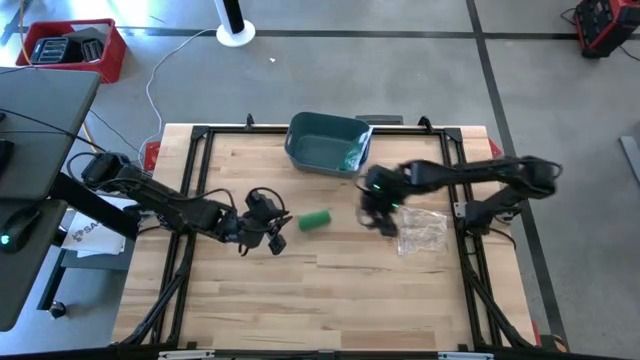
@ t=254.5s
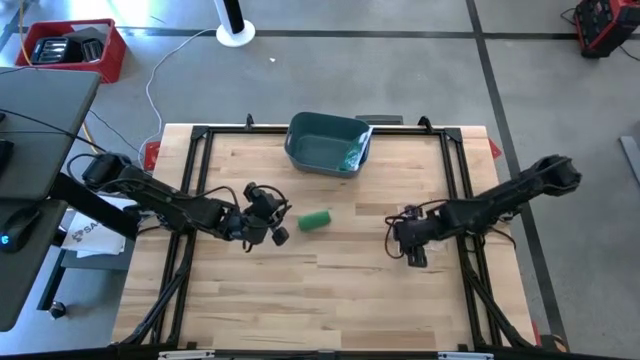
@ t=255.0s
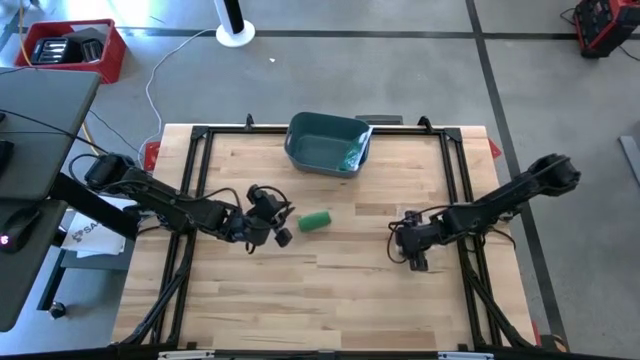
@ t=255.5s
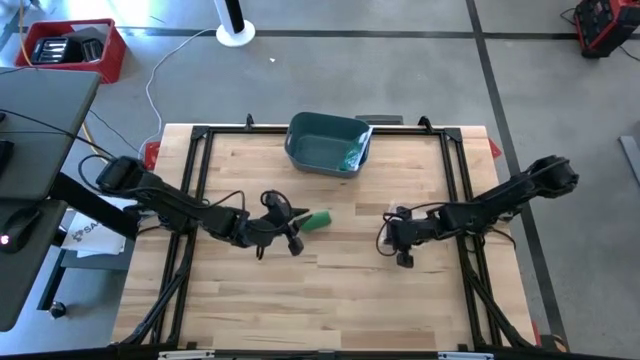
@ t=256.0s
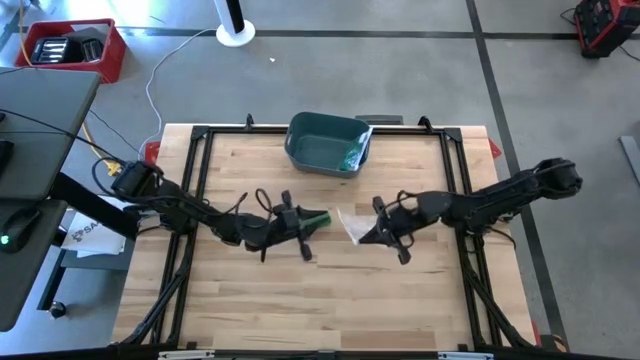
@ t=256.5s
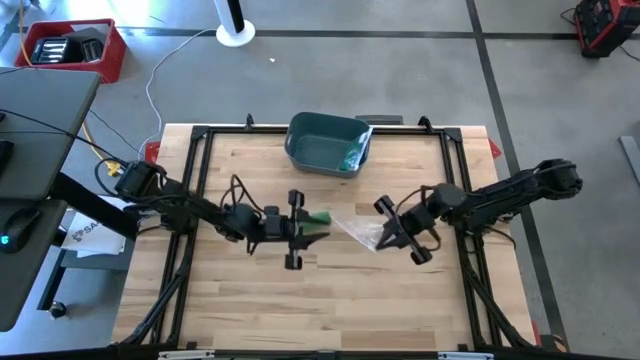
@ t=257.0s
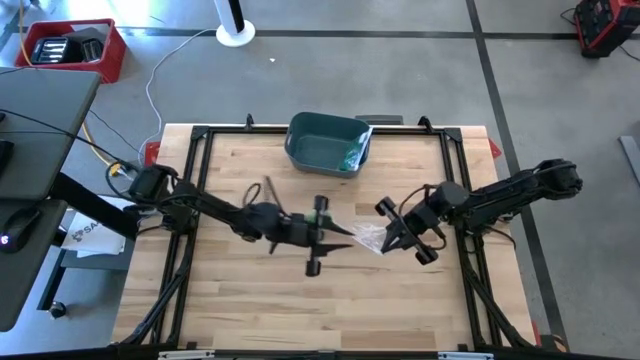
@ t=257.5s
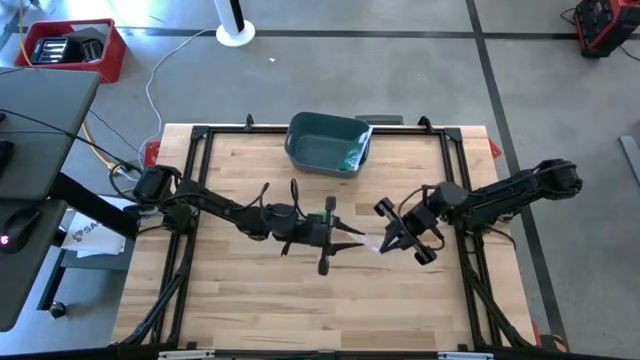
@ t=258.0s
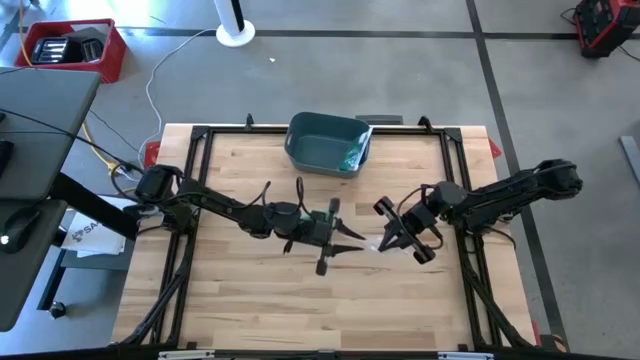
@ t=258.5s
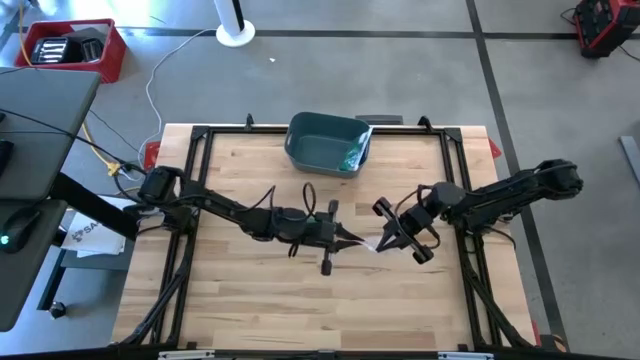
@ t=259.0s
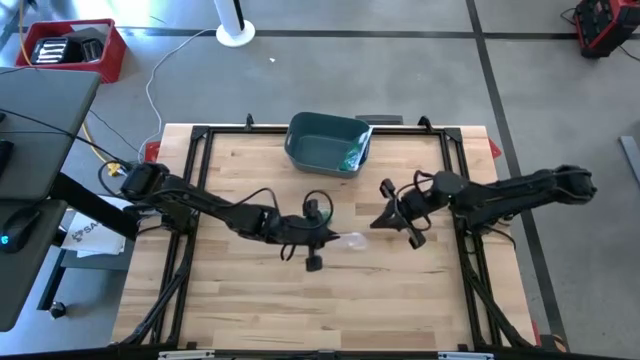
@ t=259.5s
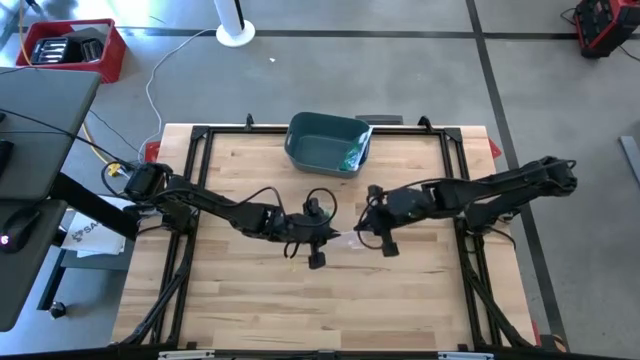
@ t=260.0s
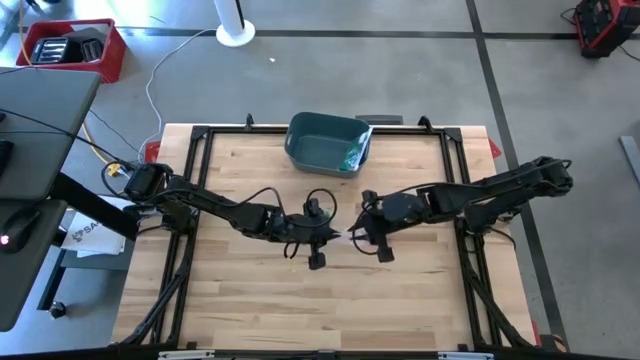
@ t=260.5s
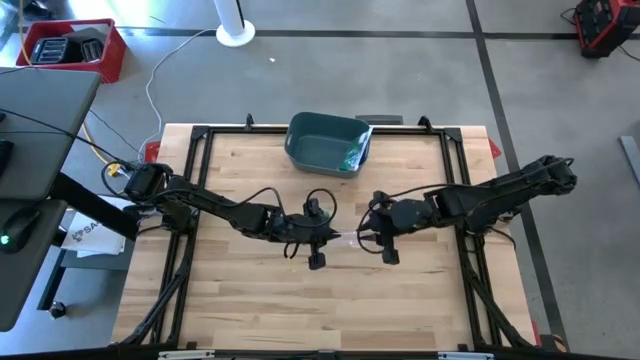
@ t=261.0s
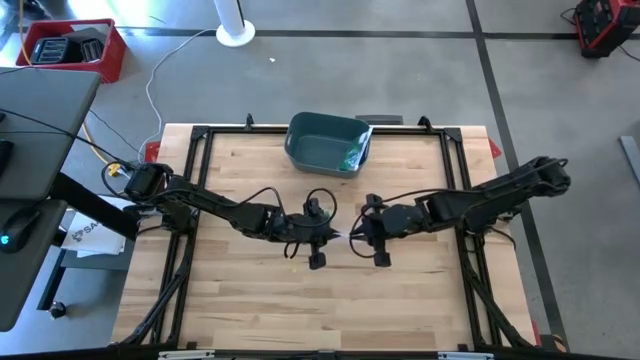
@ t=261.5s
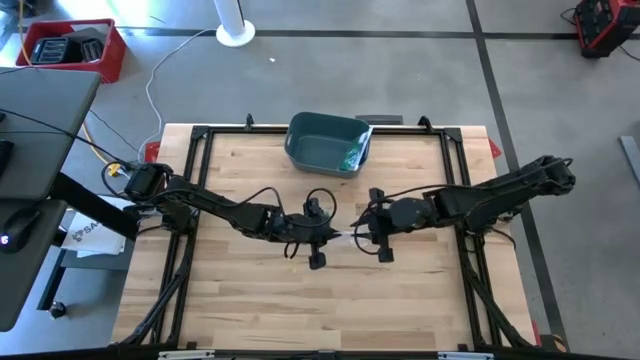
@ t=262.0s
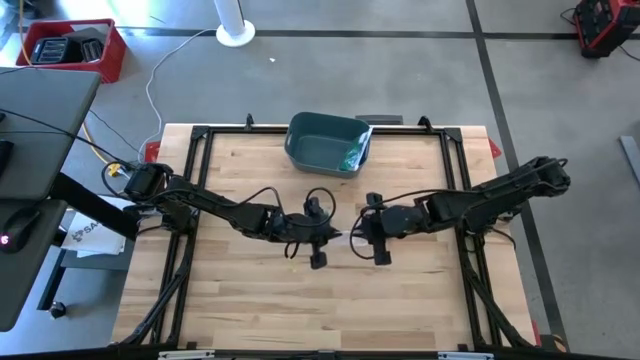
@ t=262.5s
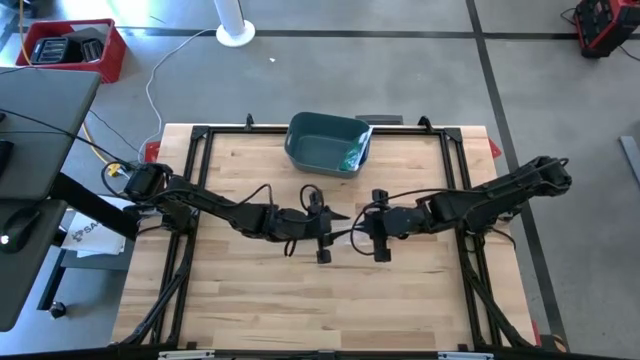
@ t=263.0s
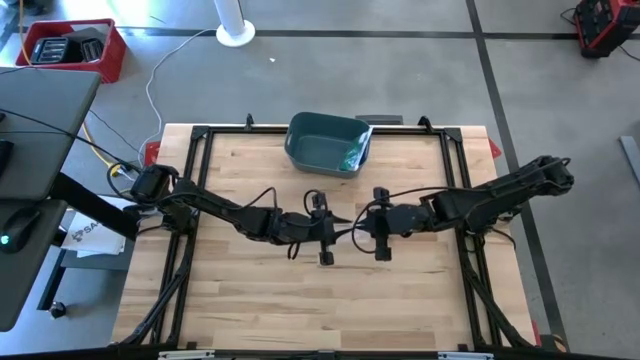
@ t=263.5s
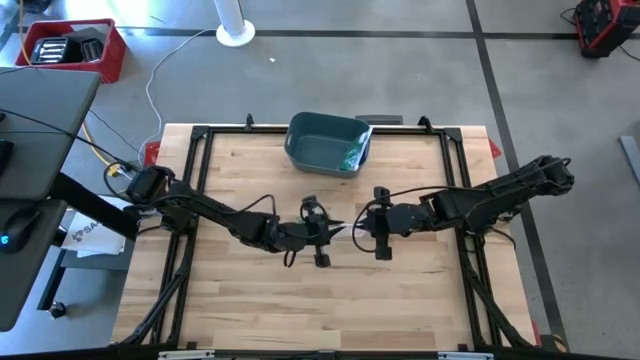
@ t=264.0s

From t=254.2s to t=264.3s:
Task: Roll bandage
Open the transparent zip bag

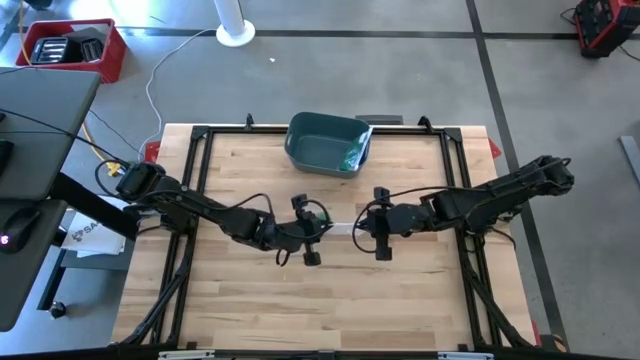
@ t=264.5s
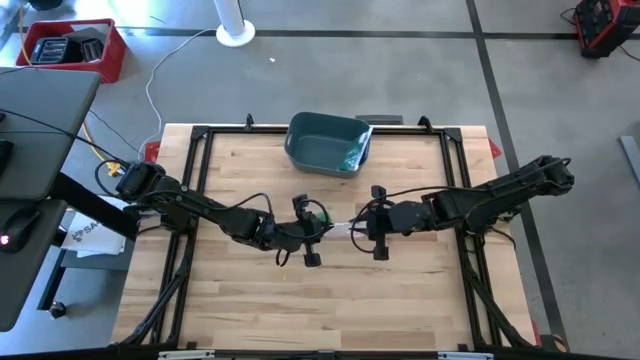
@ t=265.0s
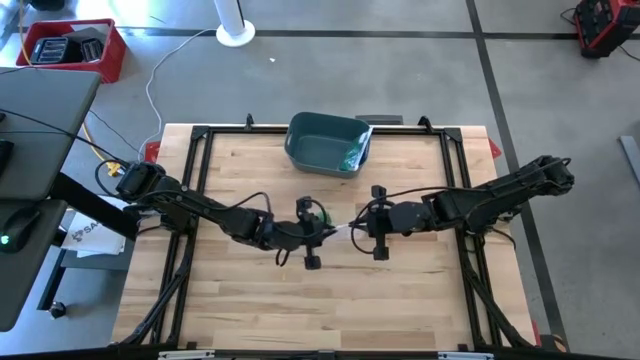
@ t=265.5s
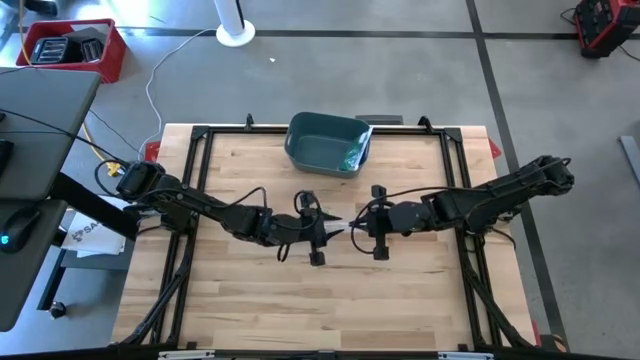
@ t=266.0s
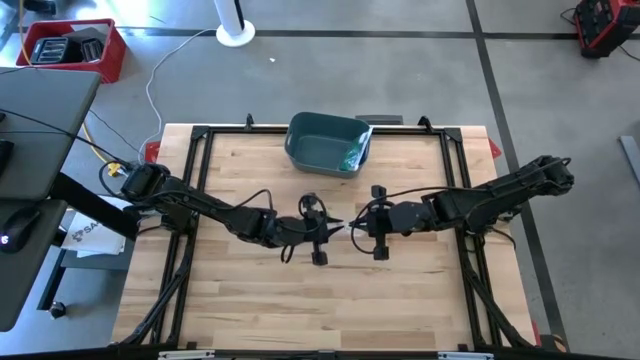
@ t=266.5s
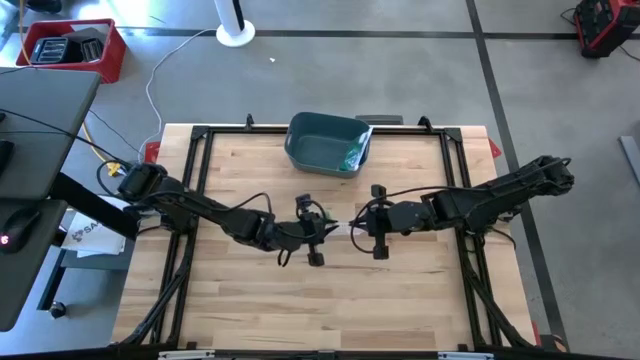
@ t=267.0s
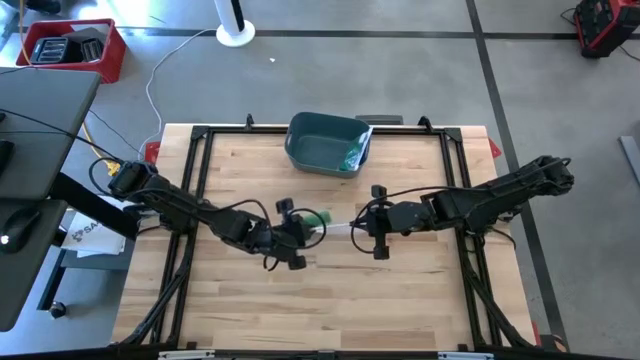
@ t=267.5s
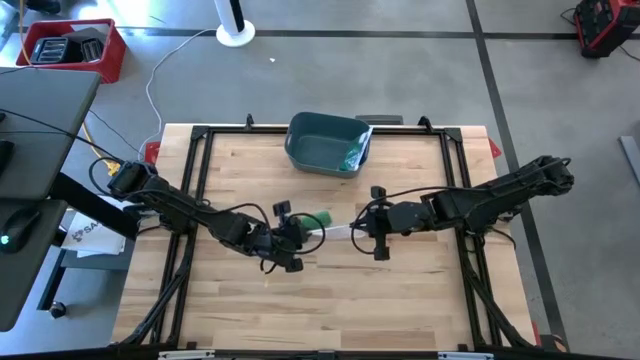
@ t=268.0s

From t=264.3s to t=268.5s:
Open the transparent zip bag

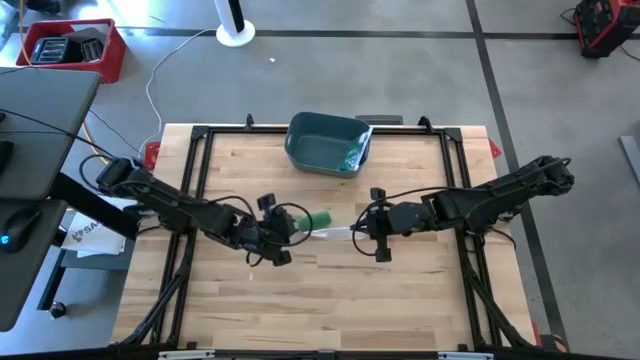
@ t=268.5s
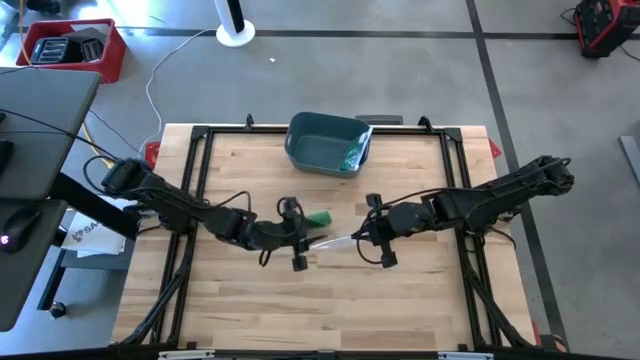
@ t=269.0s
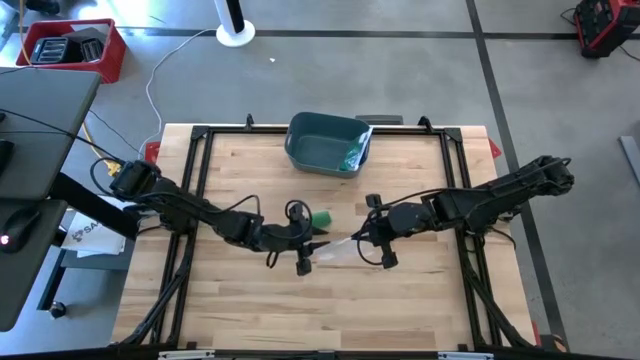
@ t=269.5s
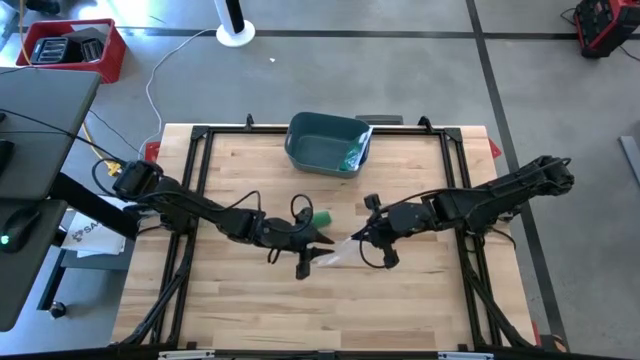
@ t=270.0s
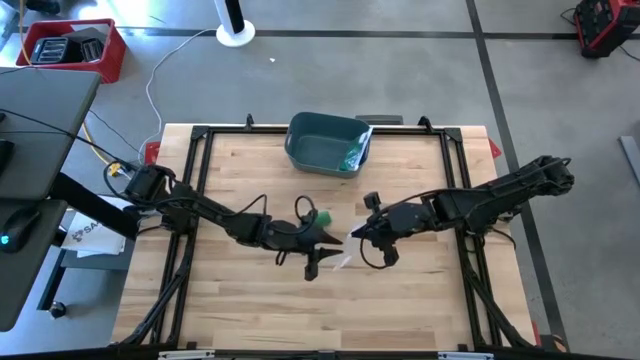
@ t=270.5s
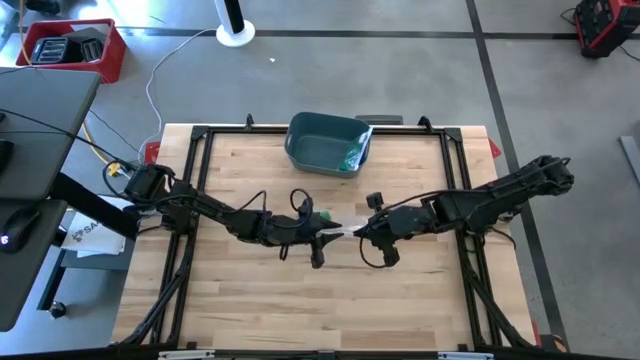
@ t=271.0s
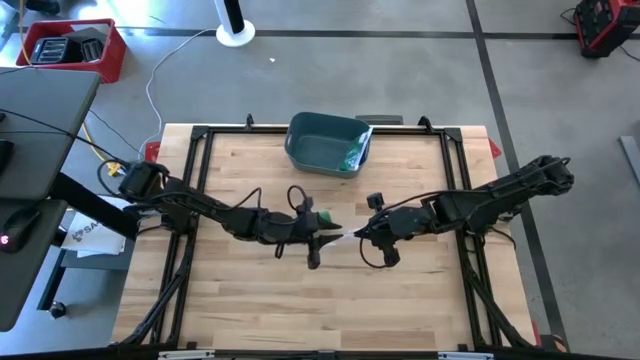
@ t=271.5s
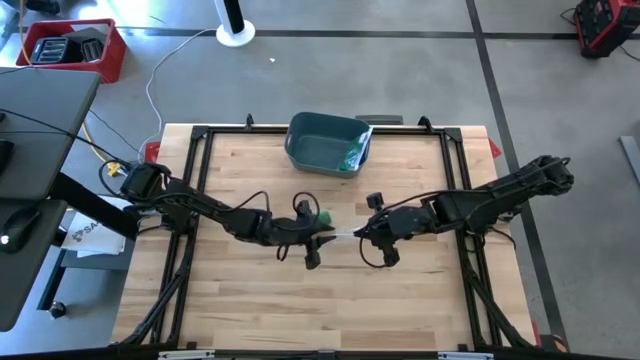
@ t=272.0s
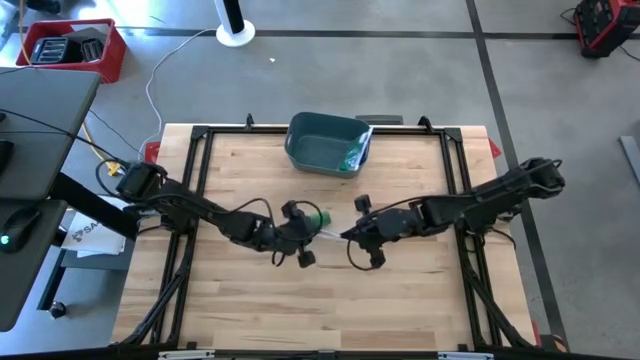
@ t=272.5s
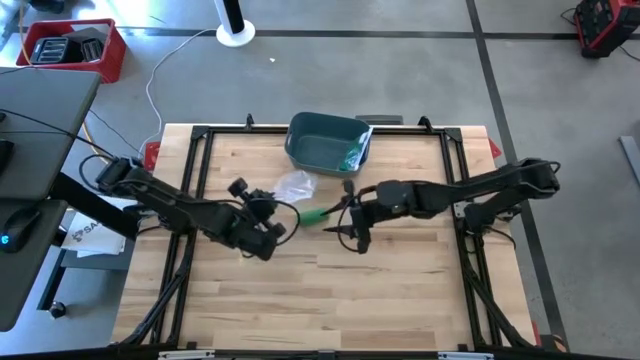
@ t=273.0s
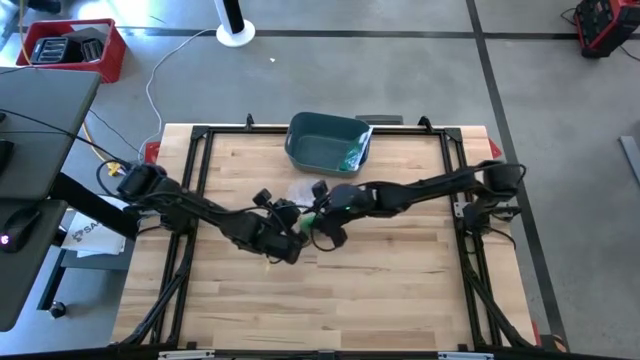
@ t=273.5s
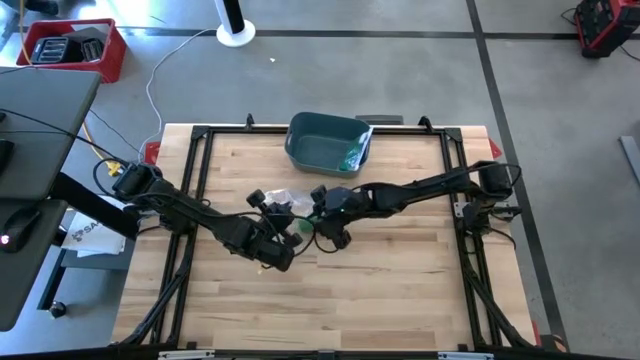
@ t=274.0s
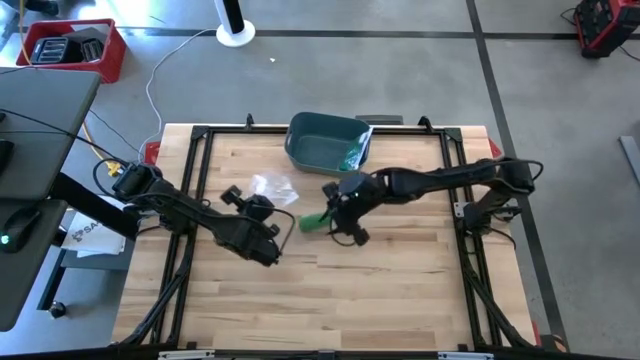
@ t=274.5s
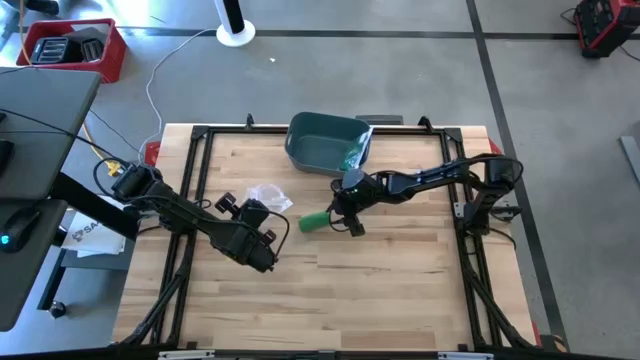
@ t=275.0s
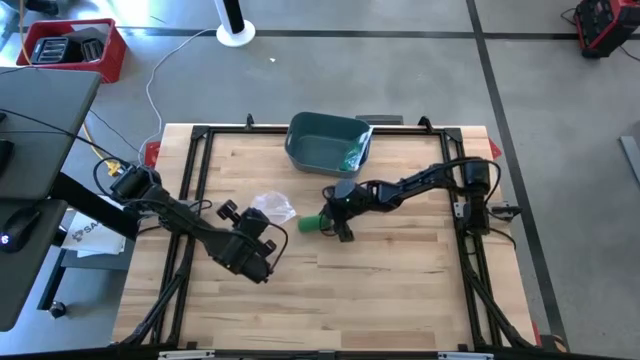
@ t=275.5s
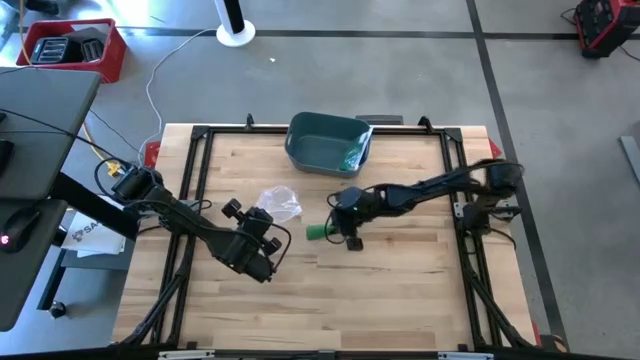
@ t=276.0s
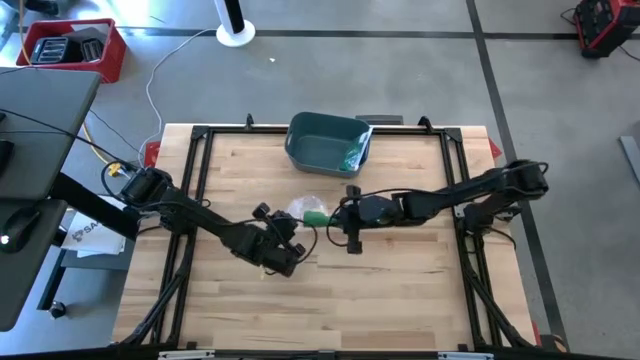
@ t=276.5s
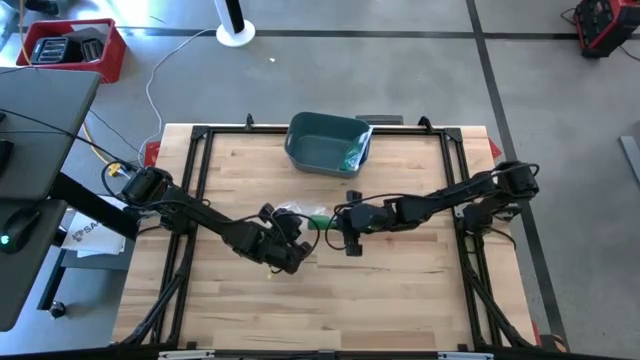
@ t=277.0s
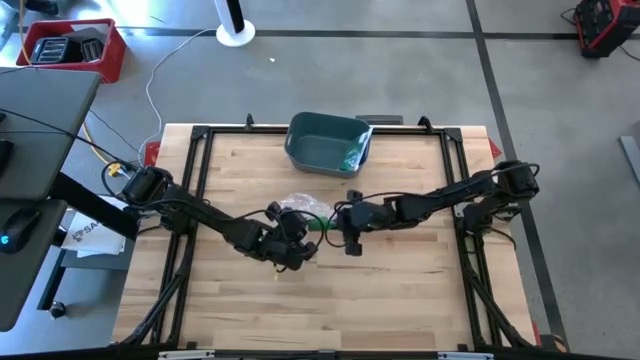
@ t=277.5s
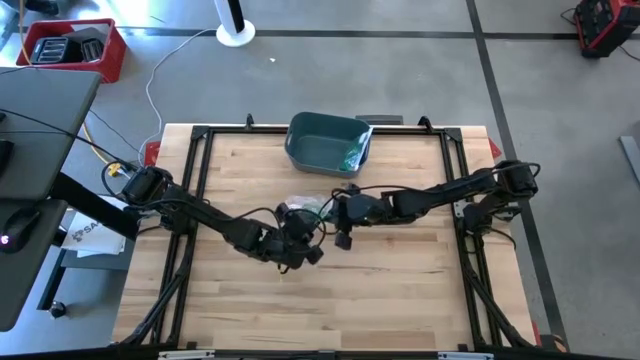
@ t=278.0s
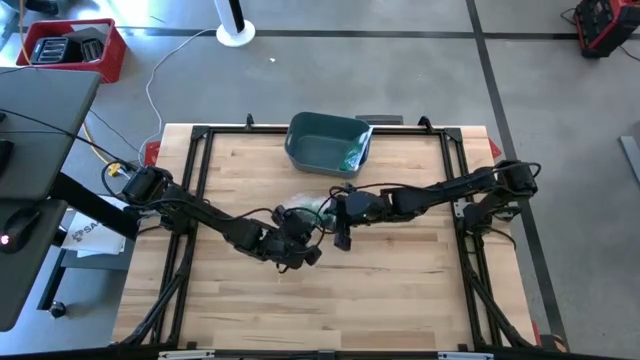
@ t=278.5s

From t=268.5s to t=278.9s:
Put the green bandage into the transparent zip bag
